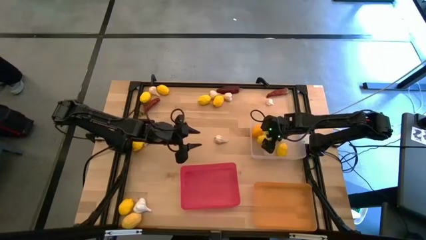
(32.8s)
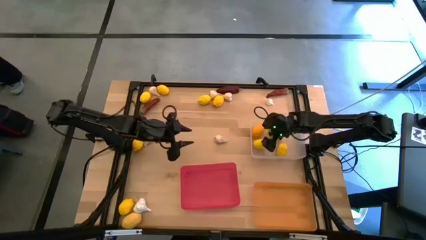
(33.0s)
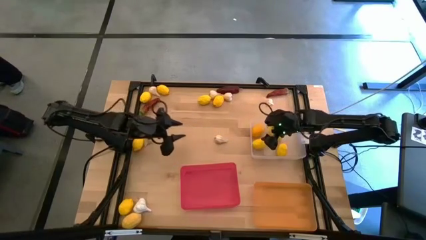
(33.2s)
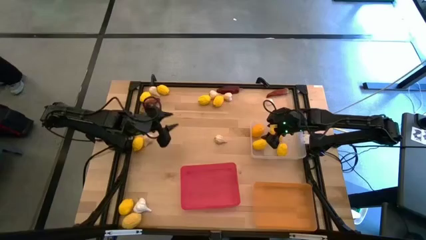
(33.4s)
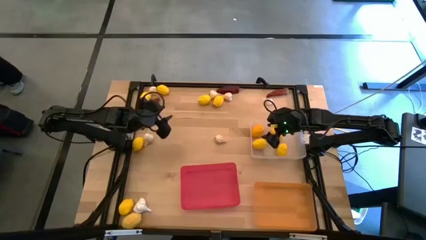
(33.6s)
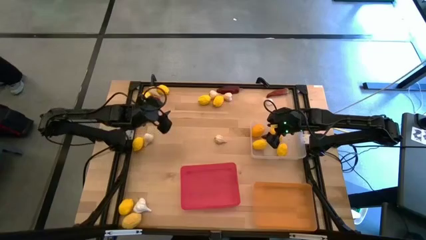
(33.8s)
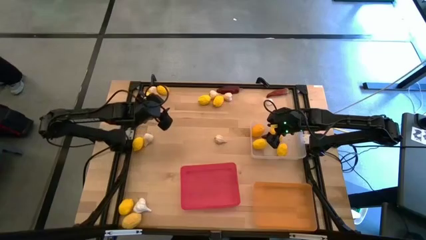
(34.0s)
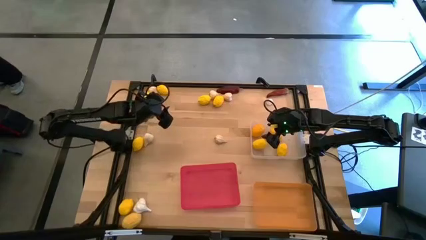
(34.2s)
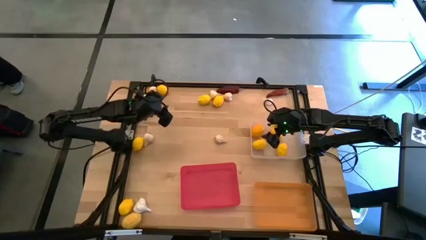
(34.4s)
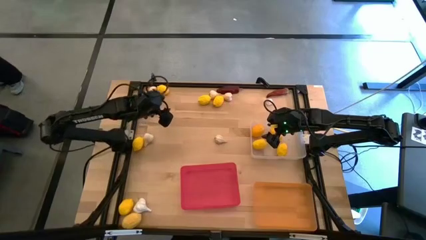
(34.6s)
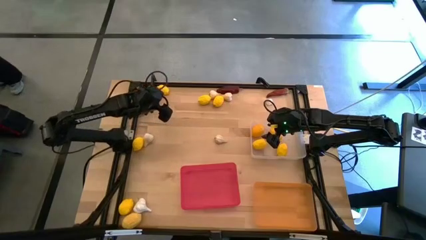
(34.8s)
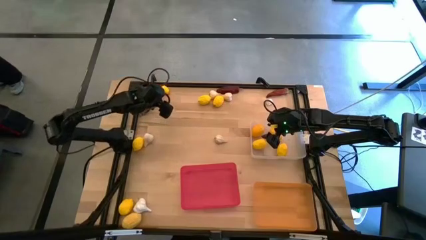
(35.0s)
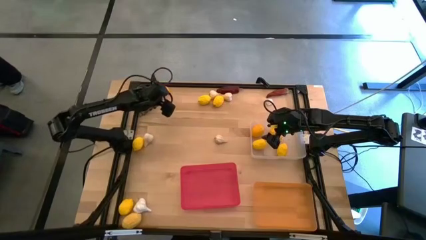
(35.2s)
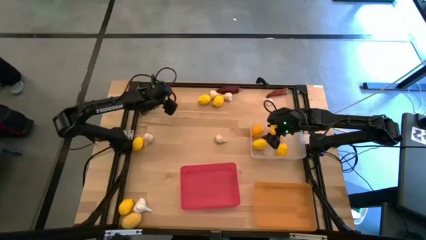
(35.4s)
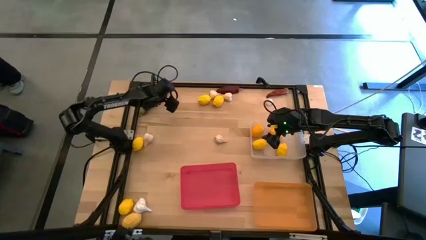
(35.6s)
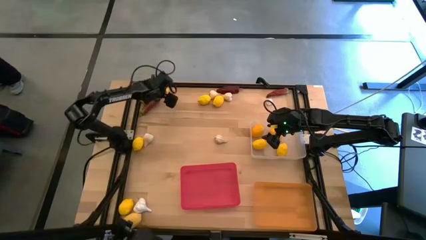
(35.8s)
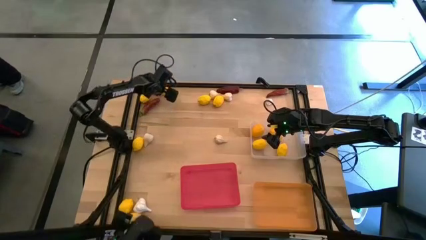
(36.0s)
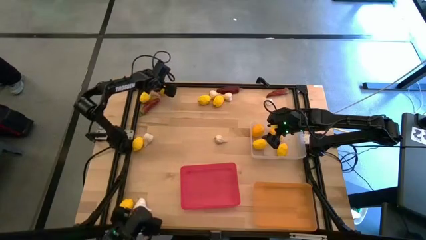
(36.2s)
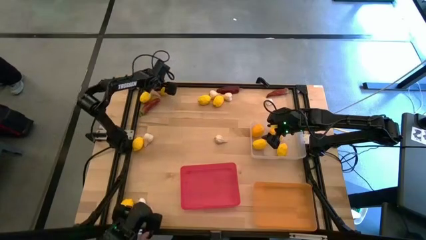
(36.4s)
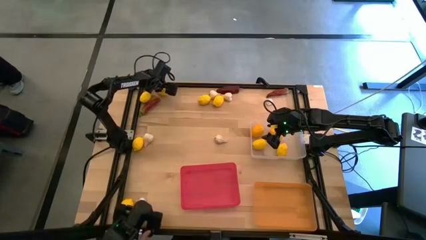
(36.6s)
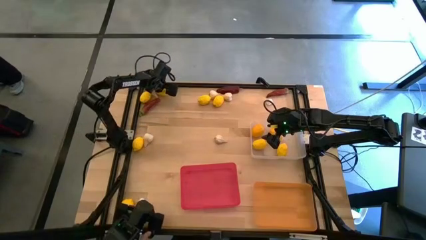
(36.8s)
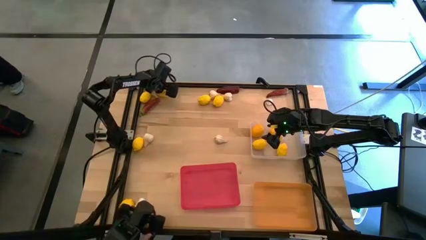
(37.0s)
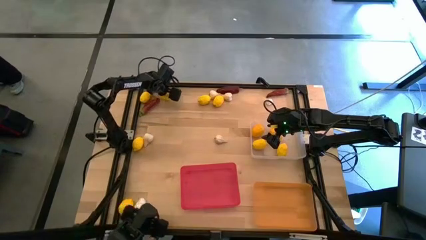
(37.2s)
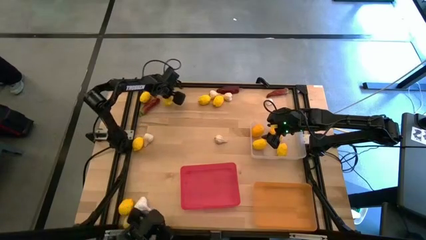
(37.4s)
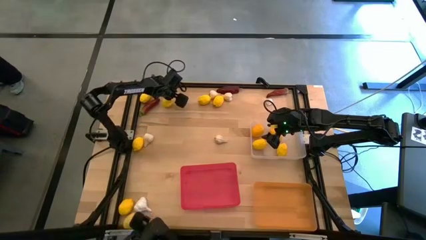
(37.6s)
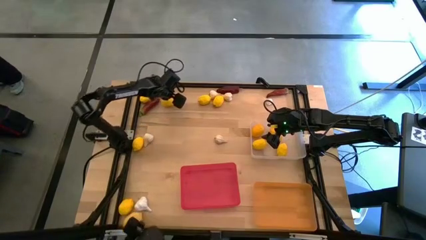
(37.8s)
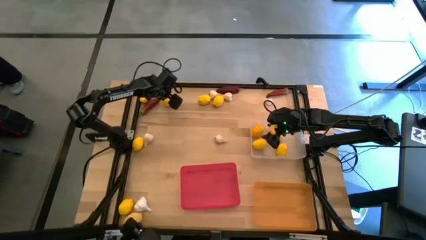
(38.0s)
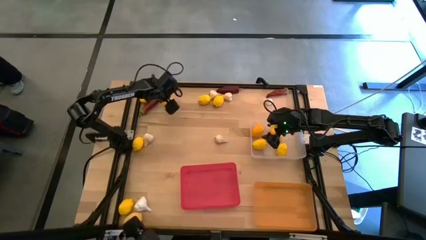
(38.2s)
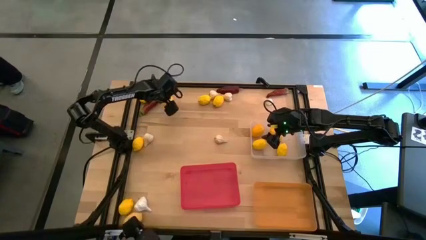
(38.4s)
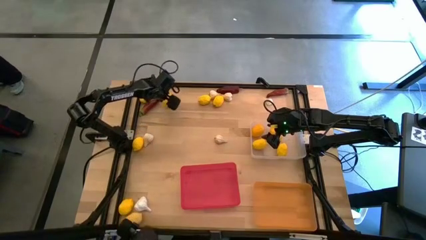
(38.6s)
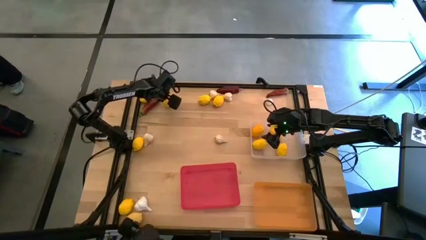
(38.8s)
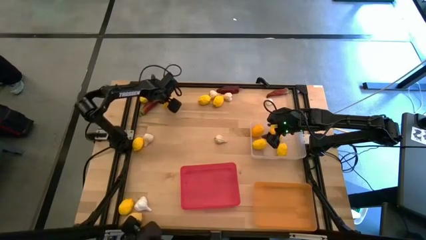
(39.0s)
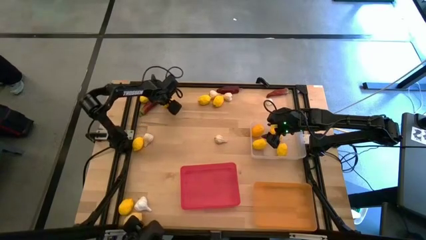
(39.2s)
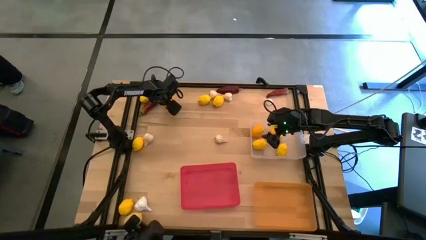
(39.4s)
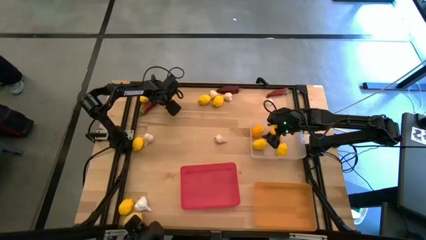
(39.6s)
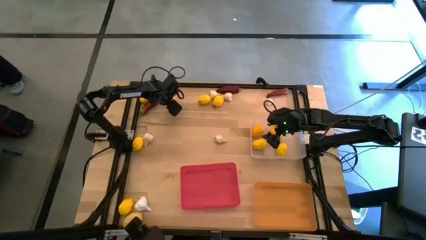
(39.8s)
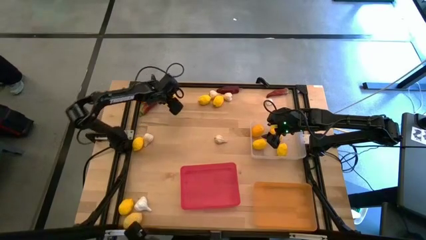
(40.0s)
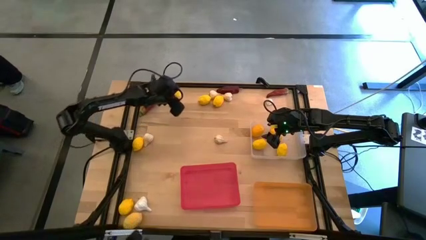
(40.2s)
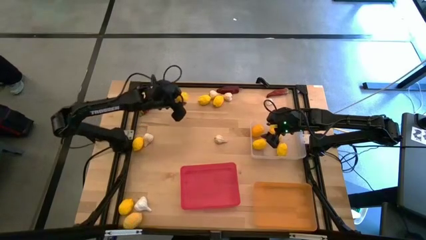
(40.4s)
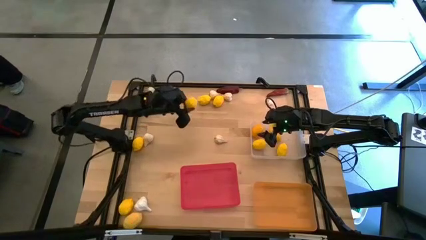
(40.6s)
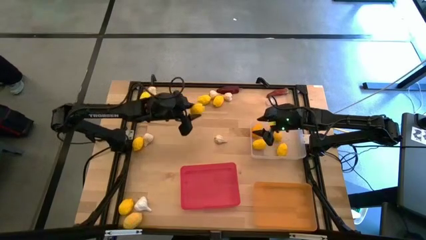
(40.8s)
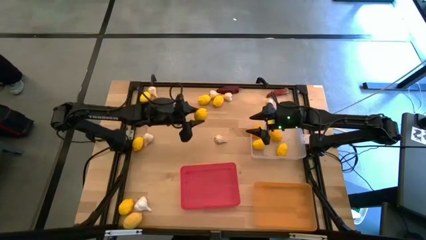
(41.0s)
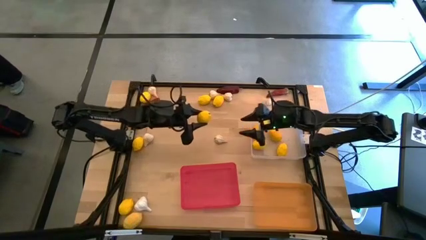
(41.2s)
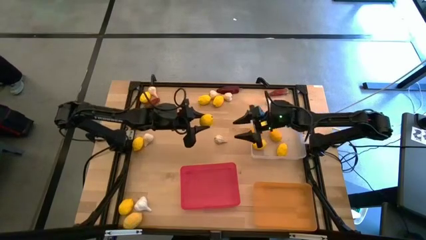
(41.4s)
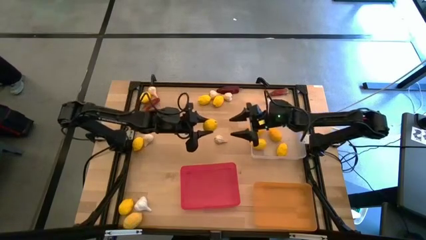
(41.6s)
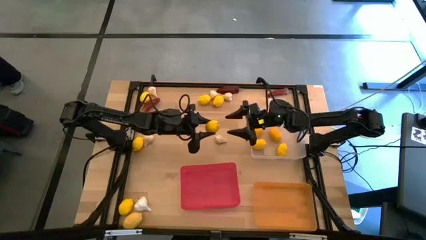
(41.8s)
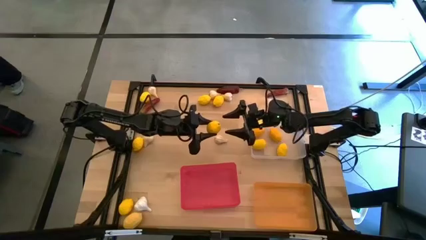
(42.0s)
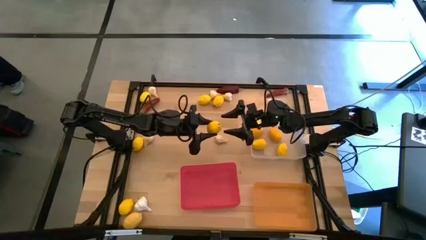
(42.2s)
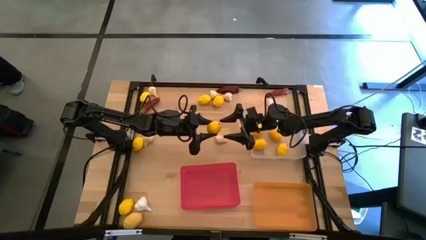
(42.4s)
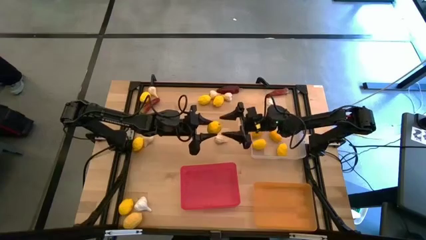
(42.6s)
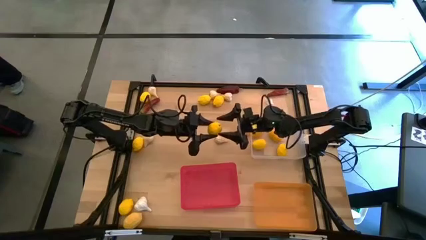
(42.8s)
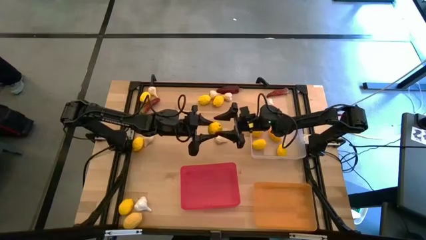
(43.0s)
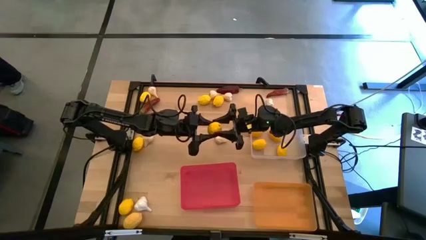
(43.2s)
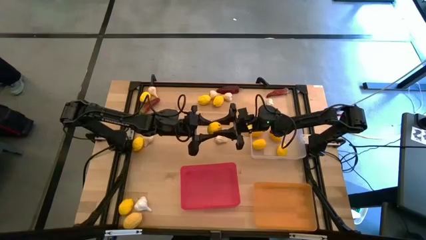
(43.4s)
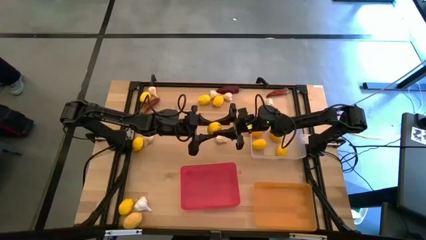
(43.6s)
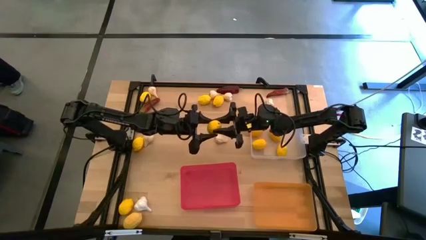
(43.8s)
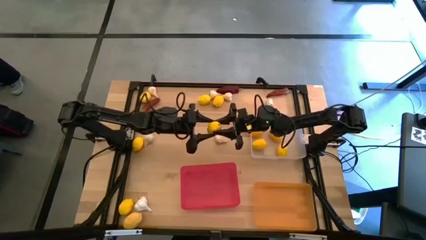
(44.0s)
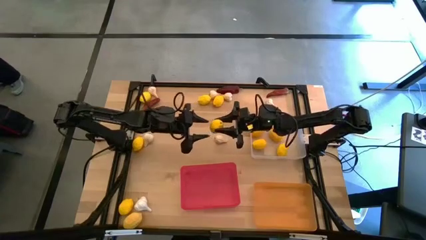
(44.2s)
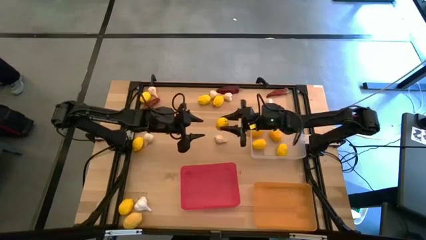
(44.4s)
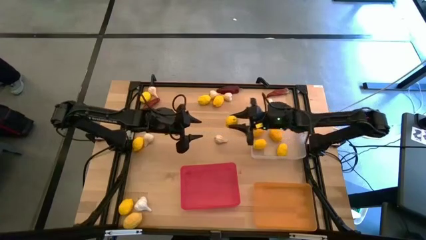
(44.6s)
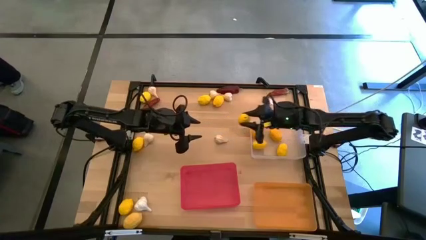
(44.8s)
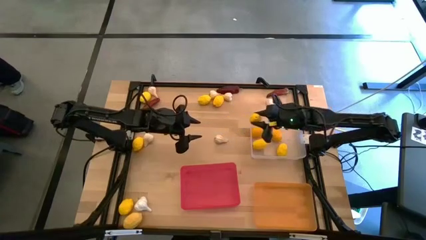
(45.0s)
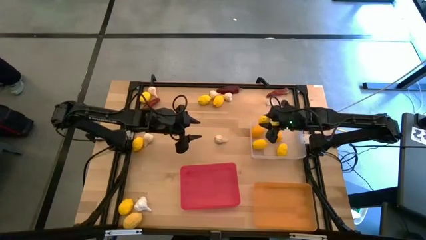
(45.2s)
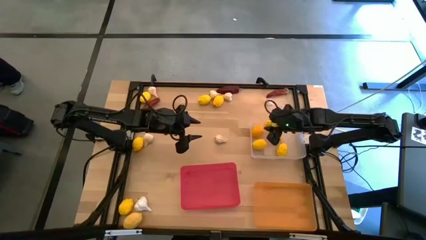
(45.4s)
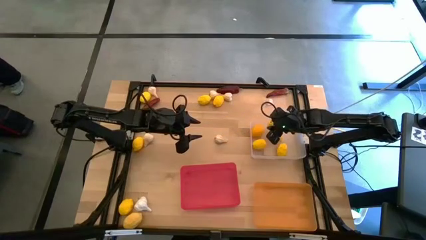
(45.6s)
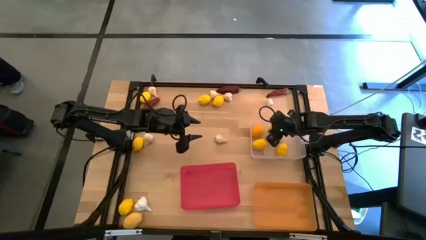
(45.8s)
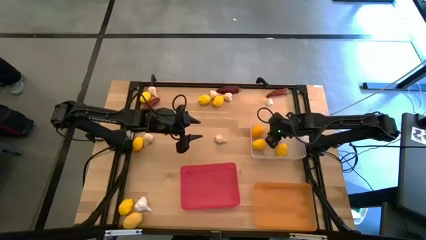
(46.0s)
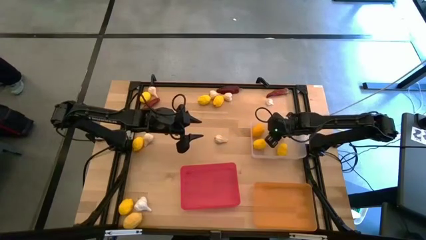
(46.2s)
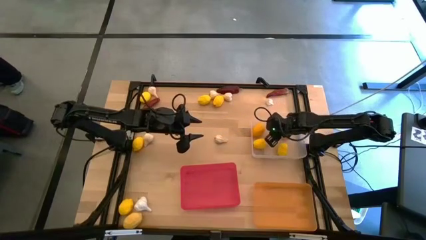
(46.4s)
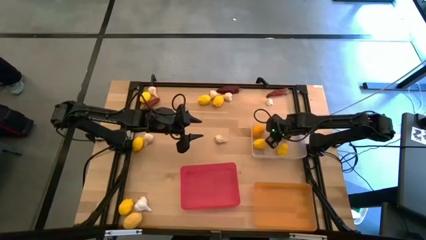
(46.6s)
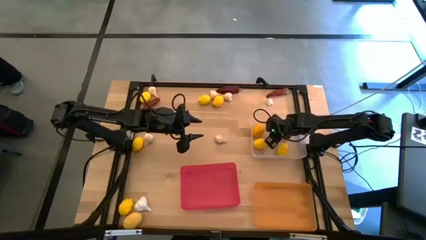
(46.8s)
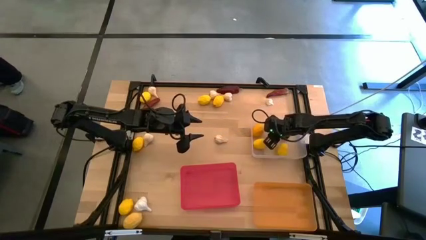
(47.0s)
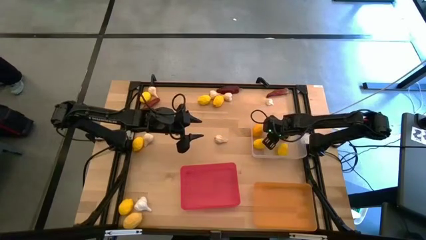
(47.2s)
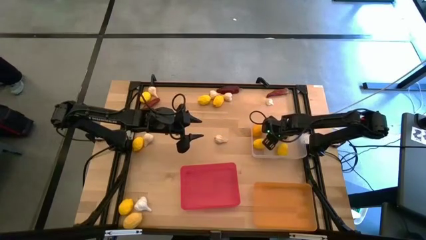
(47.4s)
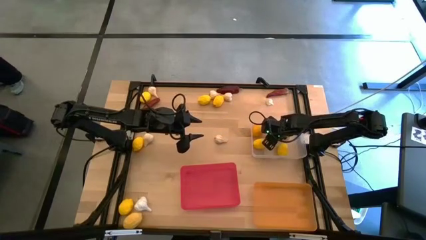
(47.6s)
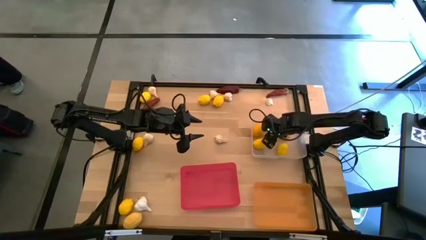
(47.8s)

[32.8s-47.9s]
Task: Sort produce into baskets
Put the yellow lemon into the transparent bin

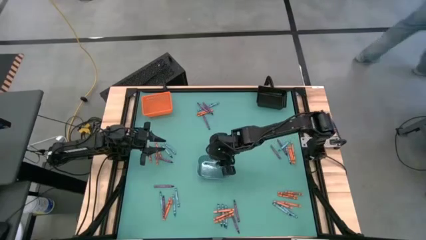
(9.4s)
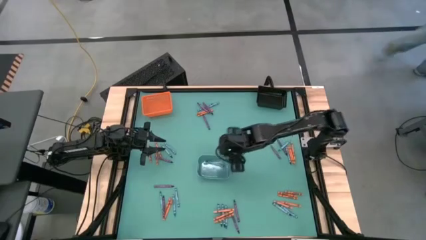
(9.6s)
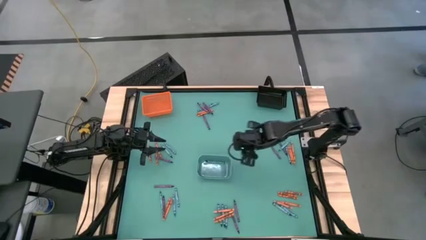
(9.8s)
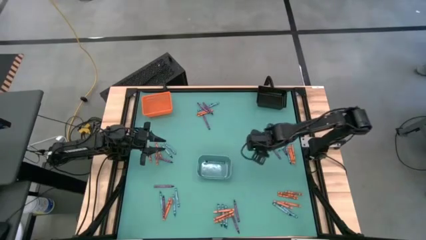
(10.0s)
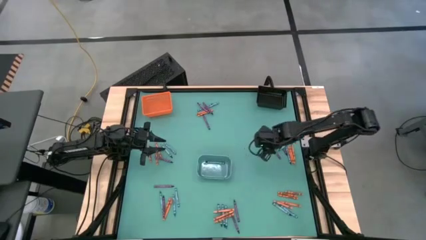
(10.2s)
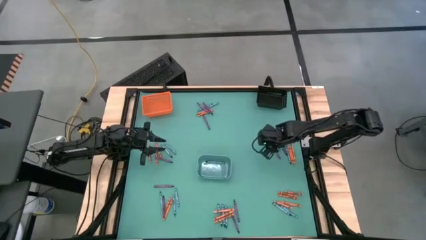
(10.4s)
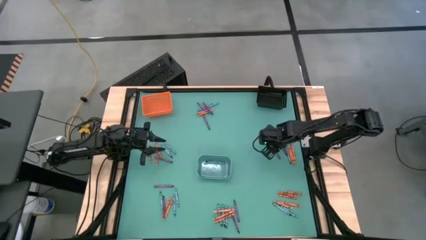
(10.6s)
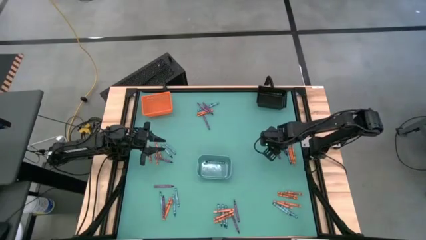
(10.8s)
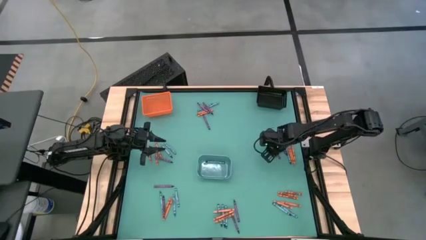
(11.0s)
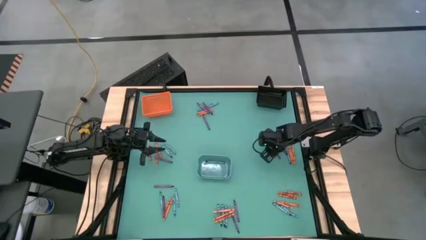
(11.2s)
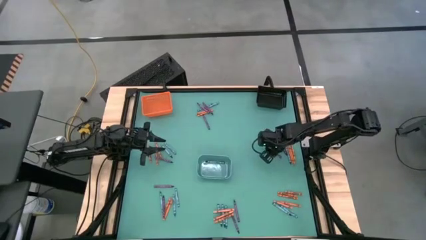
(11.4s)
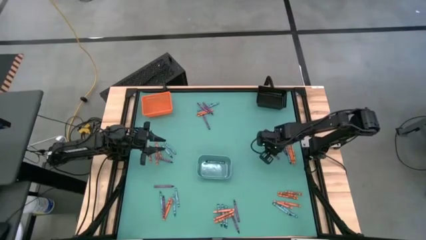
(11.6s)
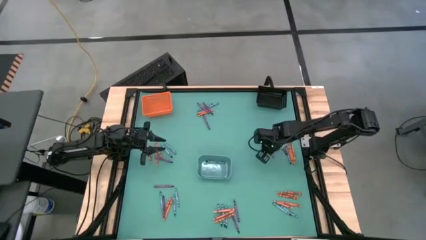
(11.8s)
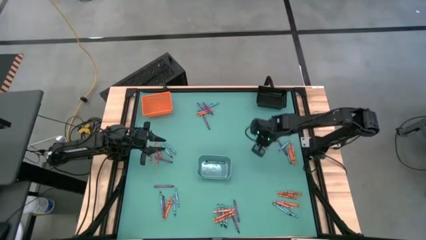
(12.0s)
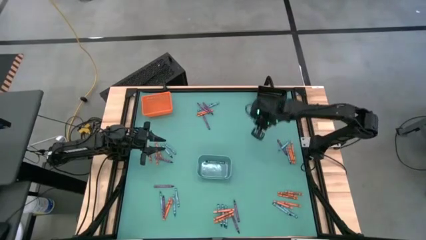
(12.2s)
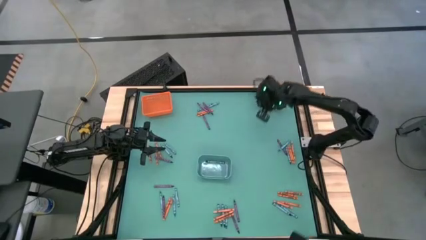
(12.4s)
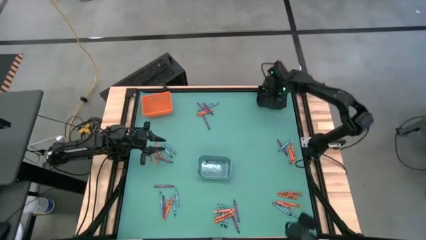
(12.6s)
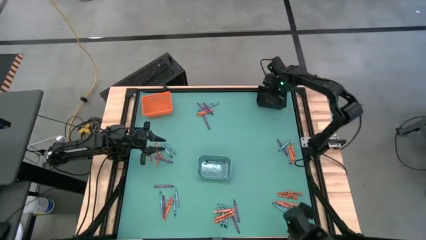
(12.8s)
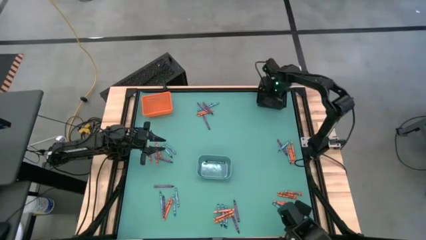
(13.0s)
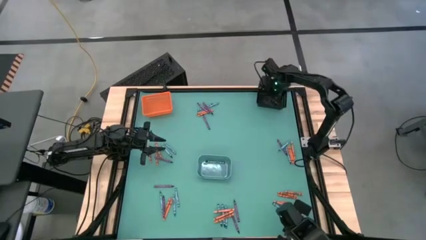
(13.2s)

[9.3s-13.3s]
Task: Sort crayons
Put the violet crayon into the black bin
